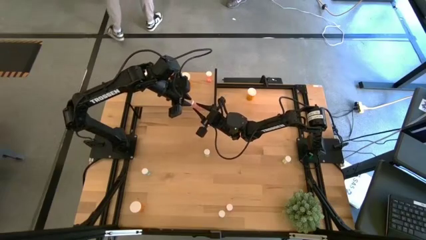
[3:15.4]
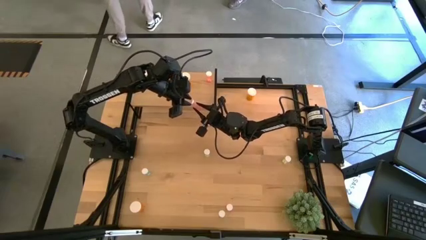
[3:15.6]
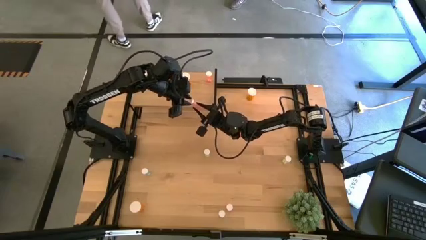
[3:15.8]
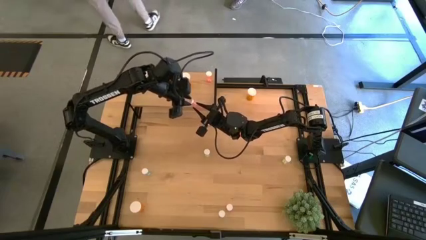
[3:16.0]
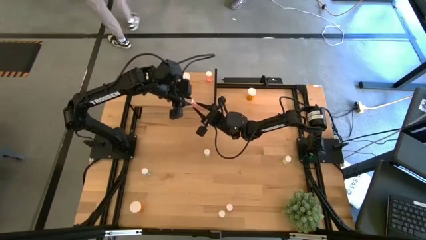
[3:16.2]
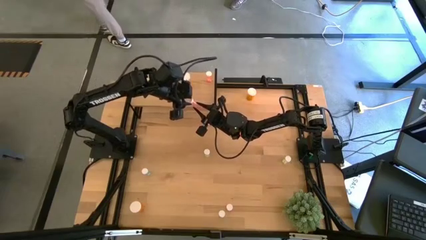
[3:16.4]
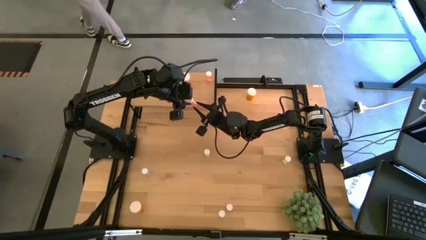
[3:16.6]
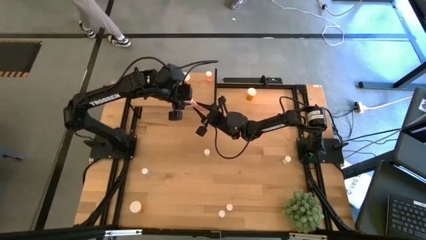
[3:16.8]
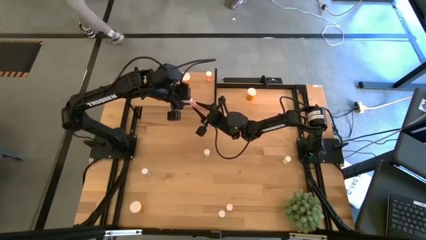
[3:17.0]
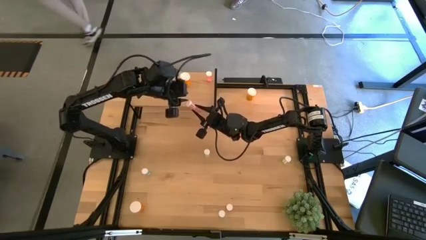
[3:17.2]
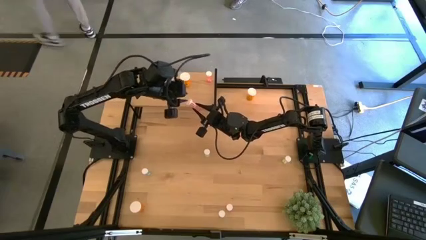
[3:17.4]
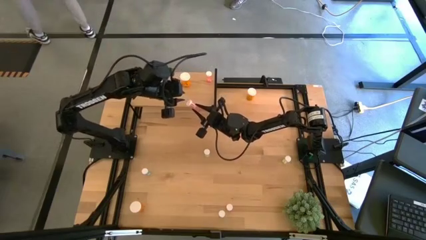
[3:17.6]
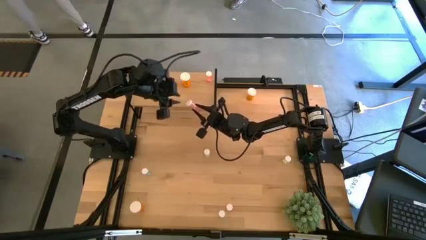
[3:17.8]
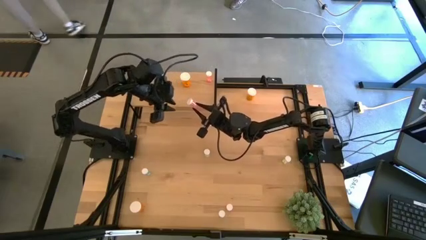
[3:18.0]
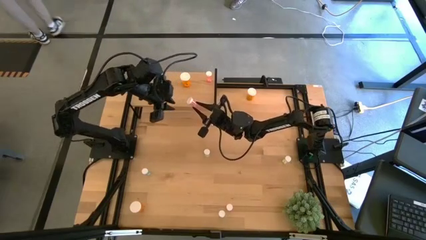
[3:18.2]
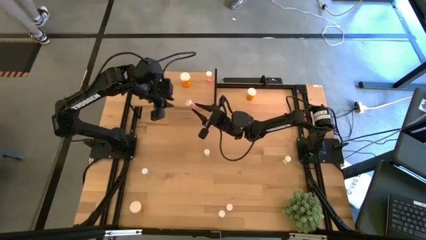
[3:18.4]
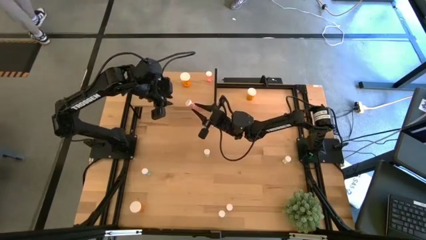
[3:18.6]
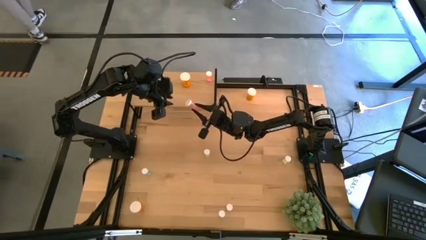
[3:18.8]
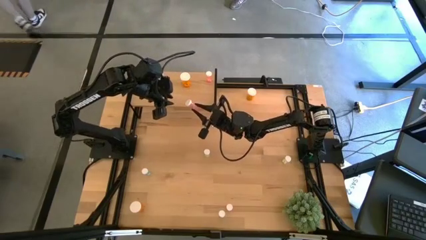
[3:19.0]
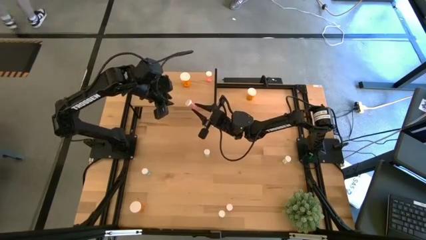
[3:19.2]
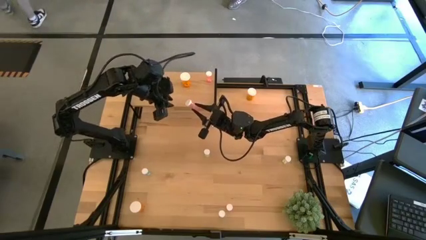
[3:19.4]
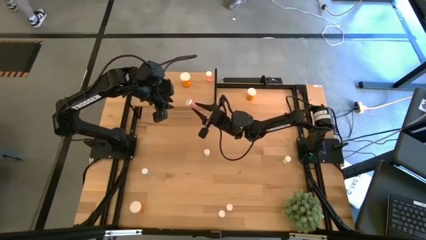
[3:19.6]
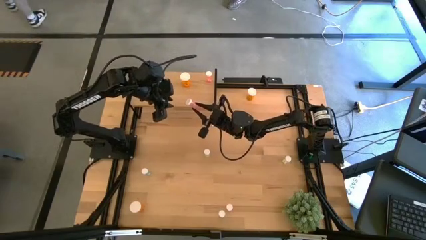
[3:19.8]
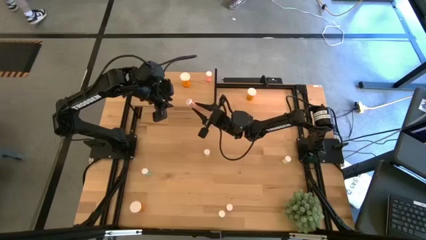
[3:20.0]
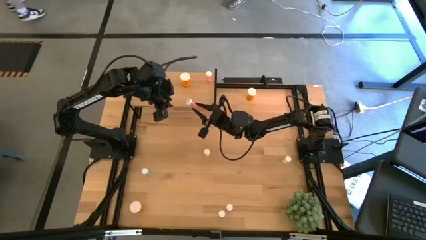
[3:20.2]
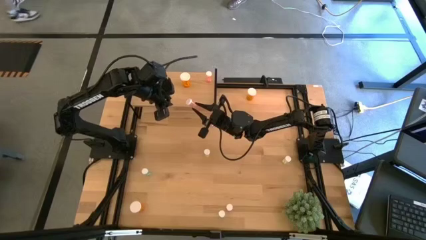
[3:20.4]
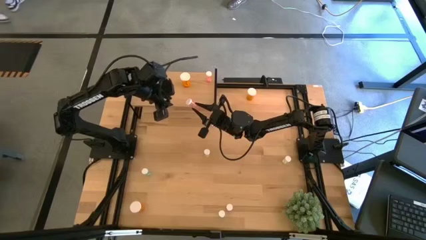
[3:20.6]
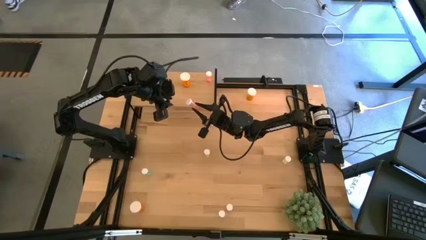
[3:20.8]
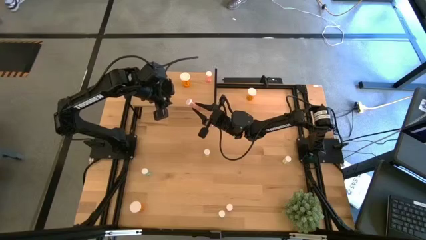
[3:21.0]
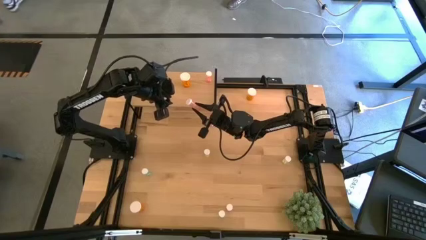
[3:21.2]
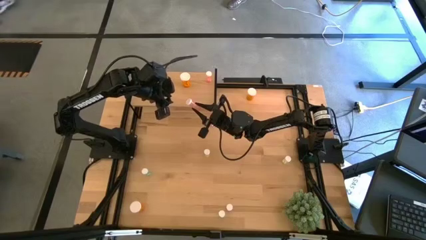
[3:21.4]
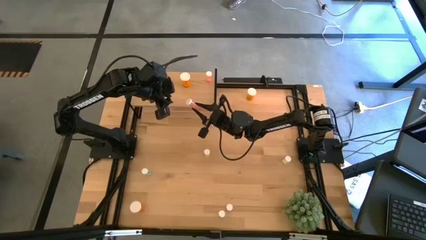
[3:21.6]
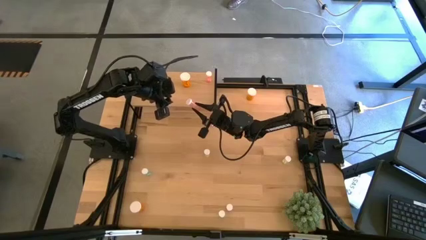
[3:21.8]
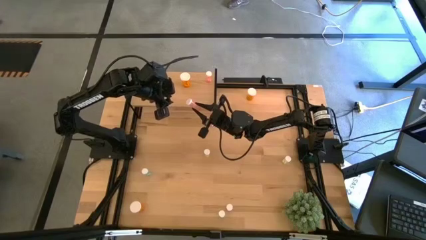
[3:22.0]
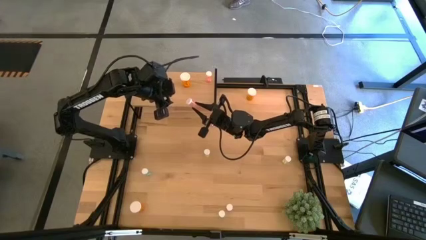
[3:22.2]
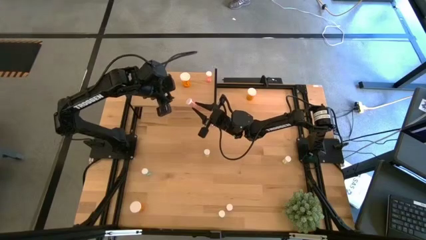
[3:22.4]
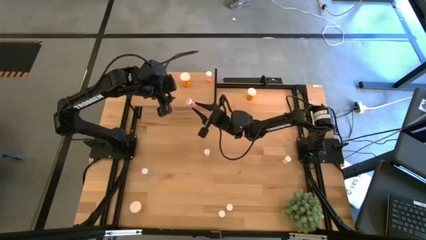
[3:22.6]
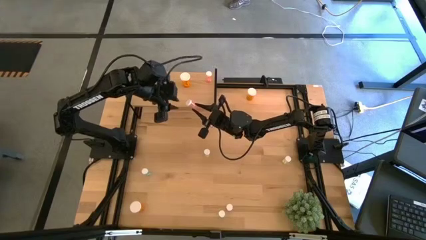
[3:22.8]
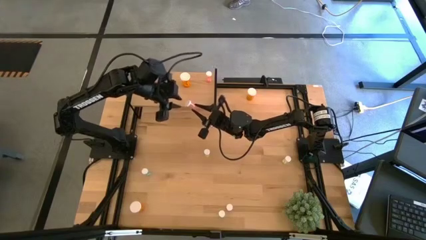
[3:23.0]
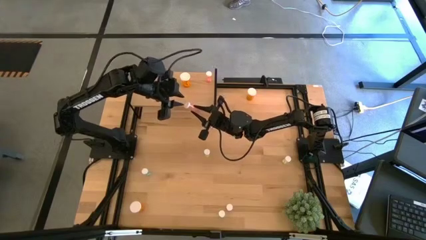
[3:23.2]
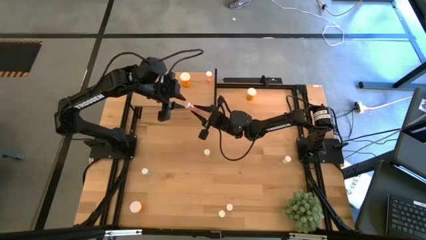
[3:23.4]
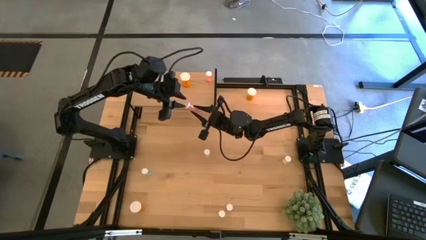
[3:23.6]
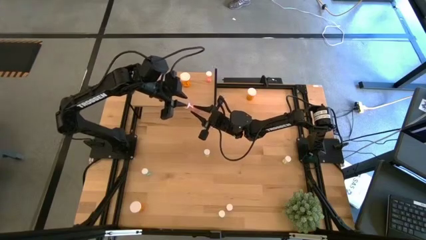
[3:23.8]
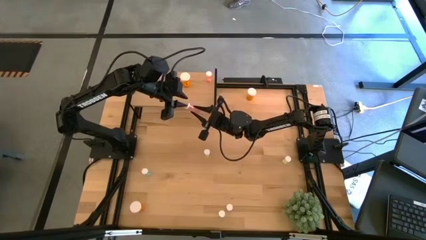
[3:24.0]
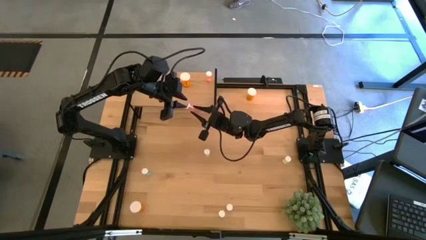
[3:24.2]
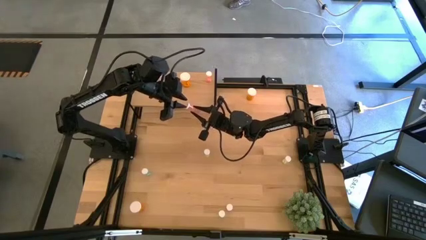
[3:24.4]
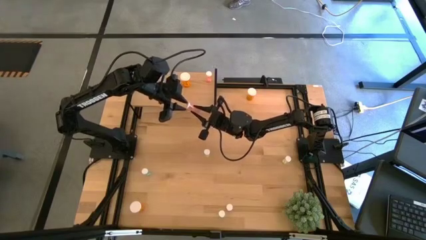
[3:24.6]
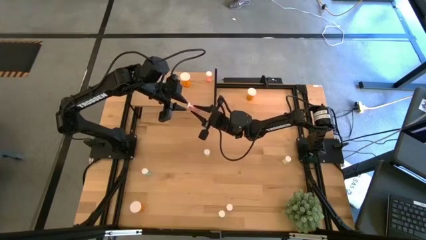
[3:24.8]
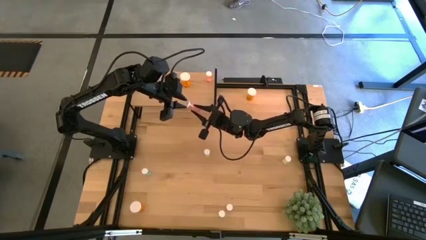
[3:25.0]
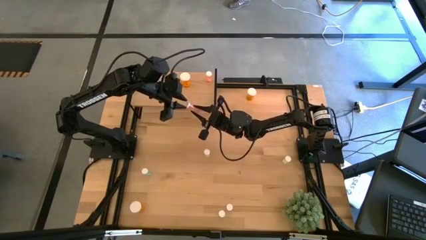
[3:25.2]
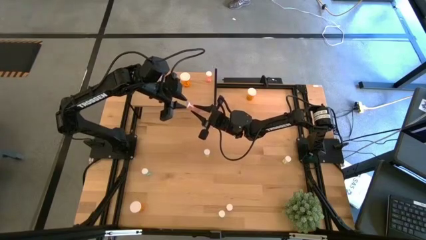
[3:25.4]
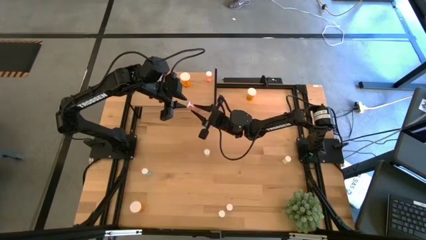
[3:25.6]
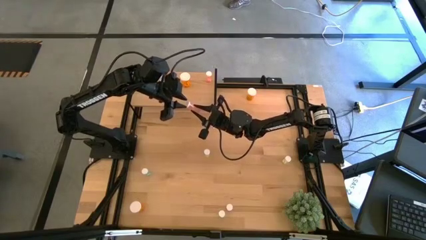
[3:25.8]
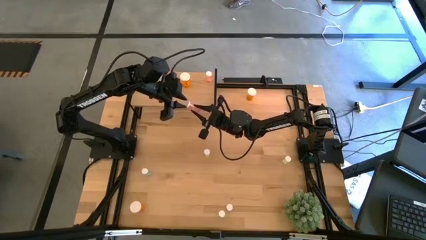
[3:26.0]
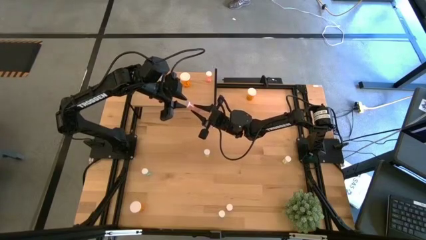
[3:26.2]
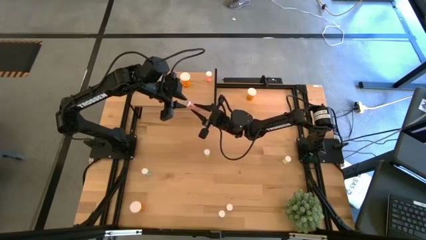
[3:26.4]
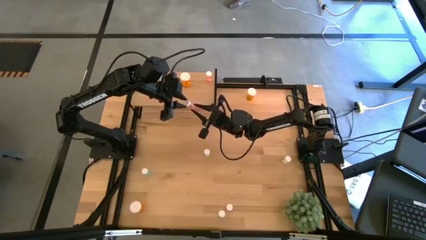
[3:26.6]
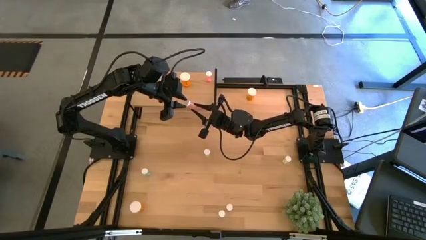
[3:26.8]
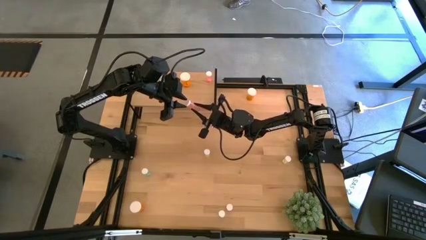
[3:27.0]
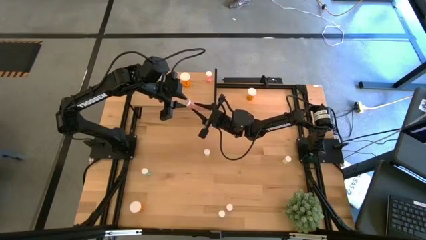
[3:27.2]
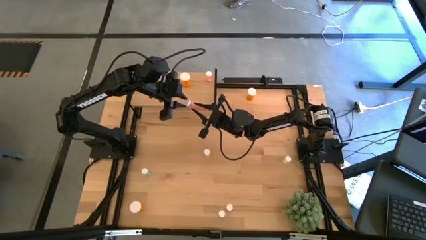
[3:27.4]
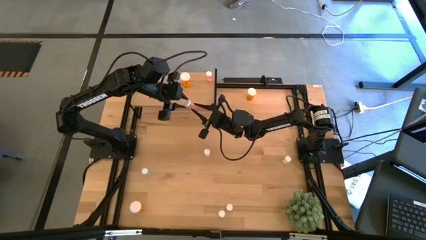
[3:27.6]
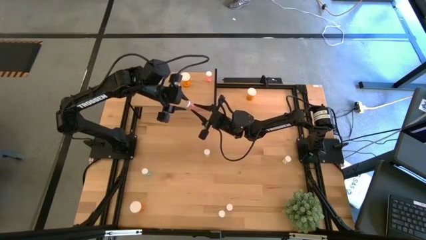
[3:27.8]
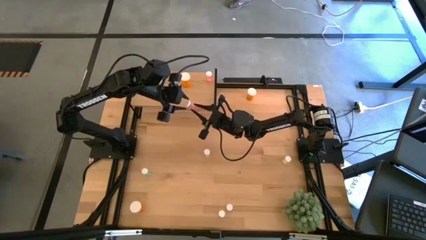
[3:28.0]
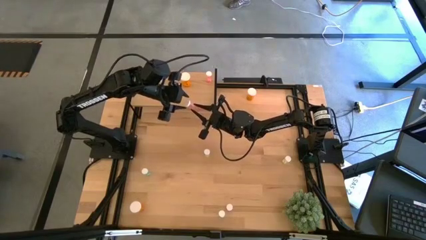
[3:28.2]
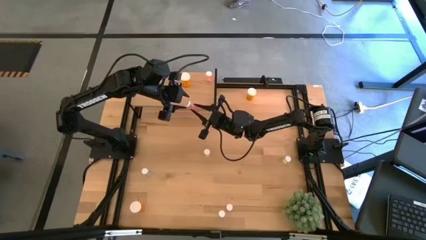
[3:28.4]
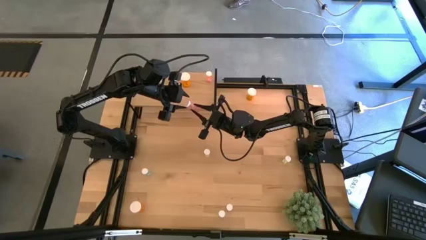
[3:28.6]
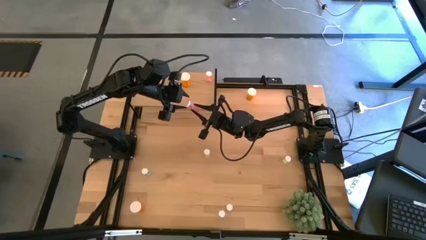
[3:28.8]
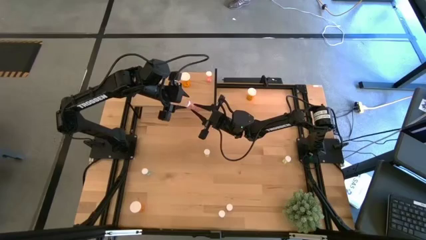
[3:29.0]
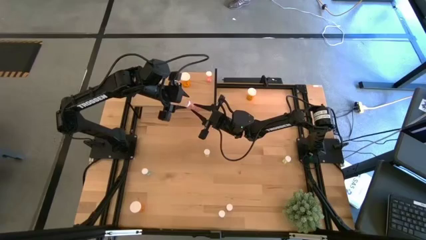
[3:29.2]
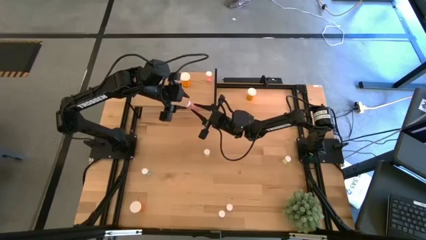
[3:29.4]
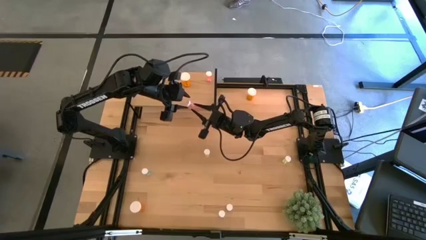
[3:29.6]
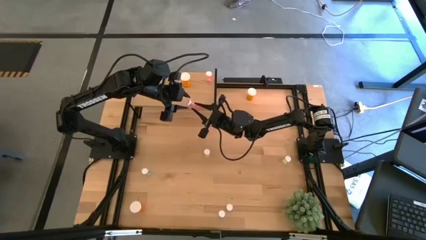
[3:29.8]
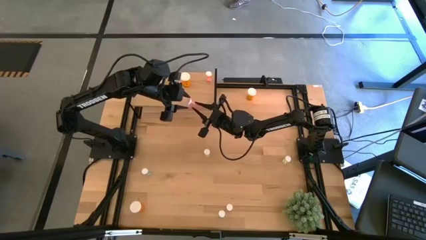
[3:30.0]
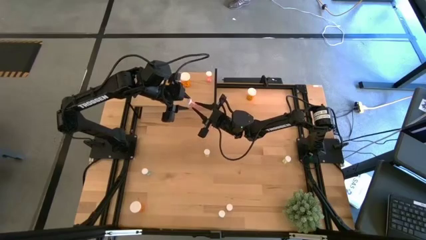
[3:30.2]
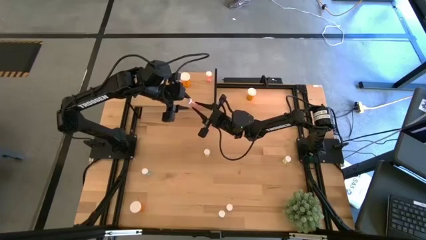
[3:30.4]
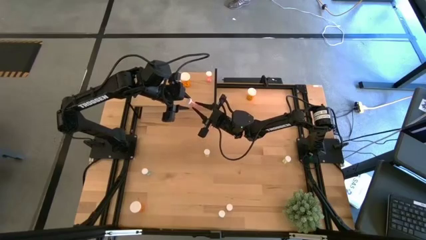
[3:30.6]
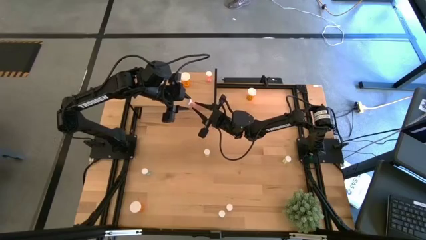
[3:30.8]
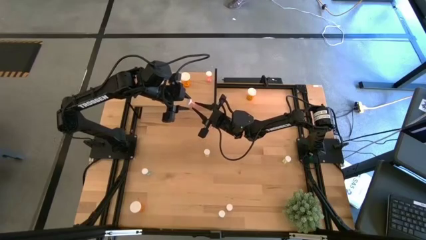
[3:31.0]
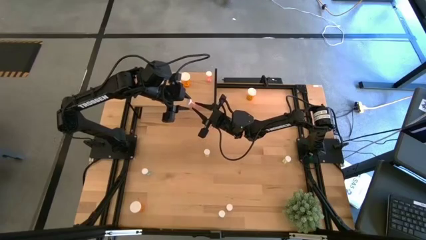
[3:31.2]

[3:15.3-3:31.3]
Task: Pick and place medicine bottles onto shelf by color
Put the top red pill bottle on the shelf aligned with the red pill bottle on the shelf
